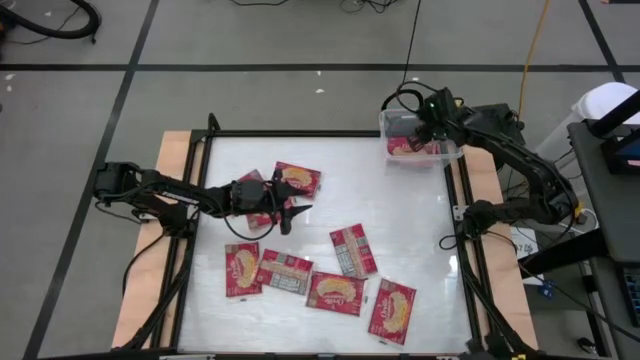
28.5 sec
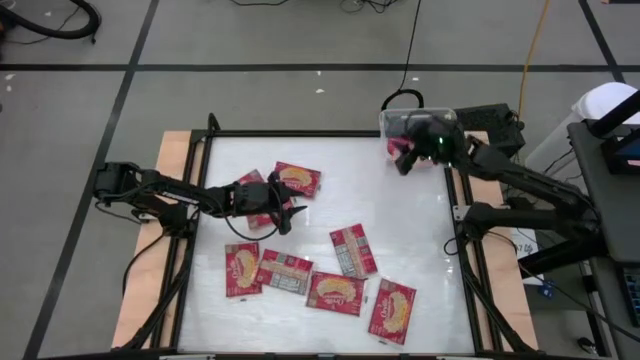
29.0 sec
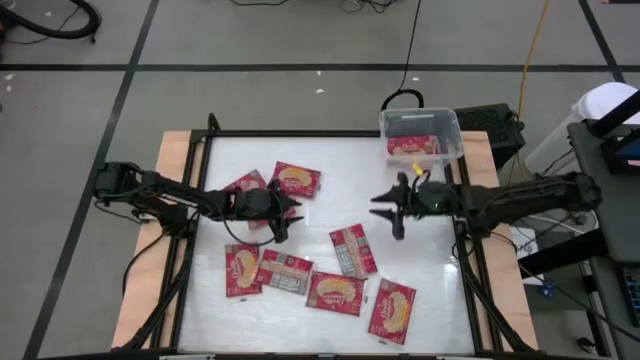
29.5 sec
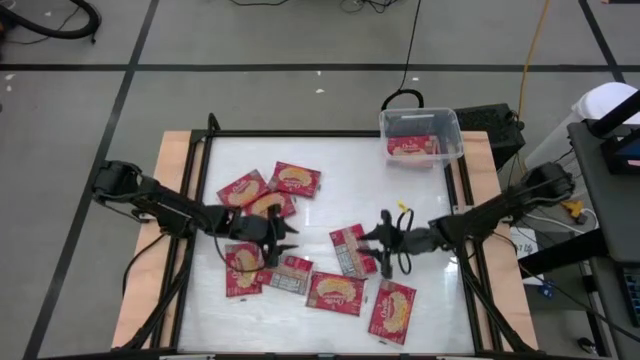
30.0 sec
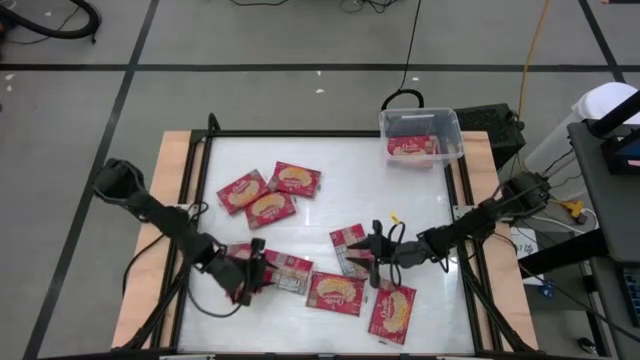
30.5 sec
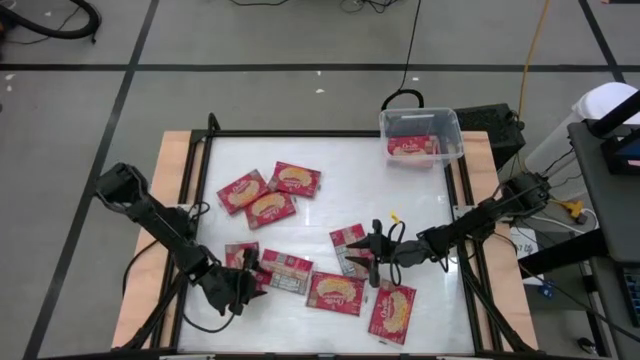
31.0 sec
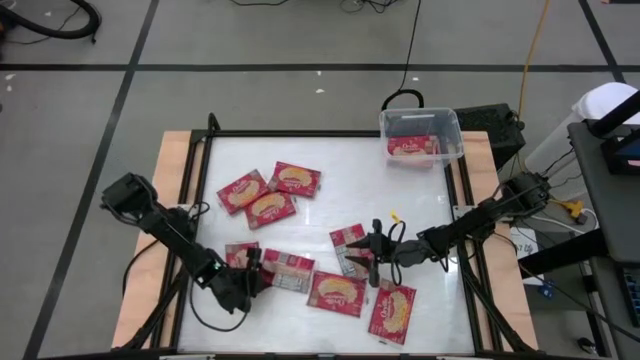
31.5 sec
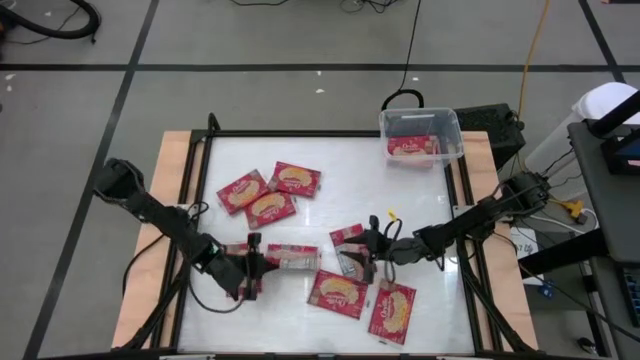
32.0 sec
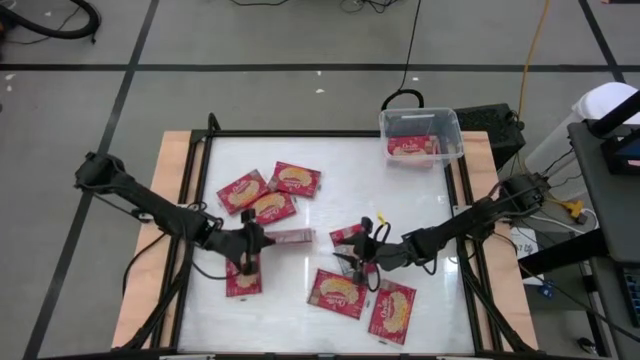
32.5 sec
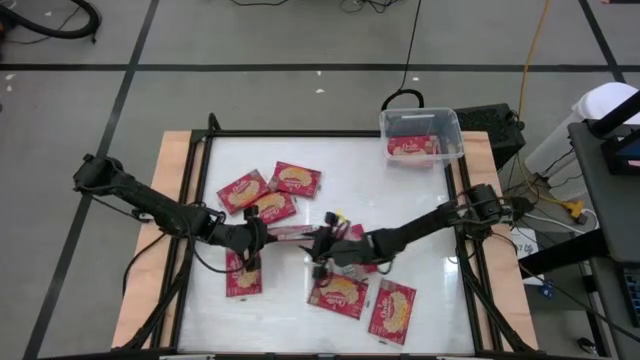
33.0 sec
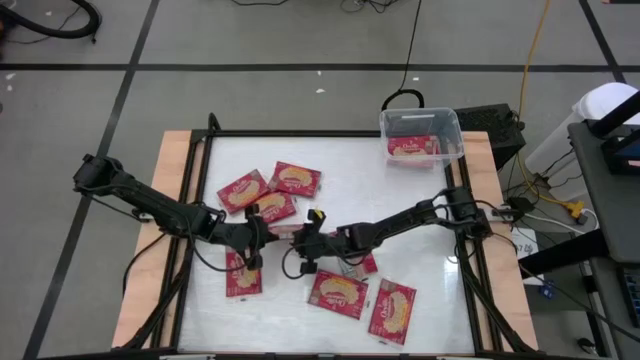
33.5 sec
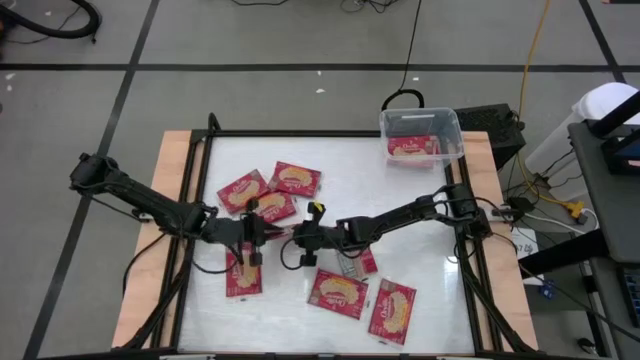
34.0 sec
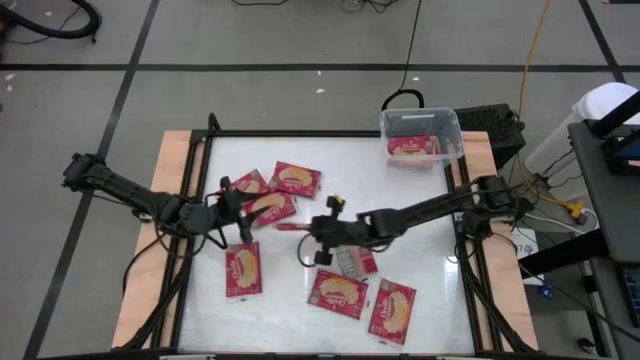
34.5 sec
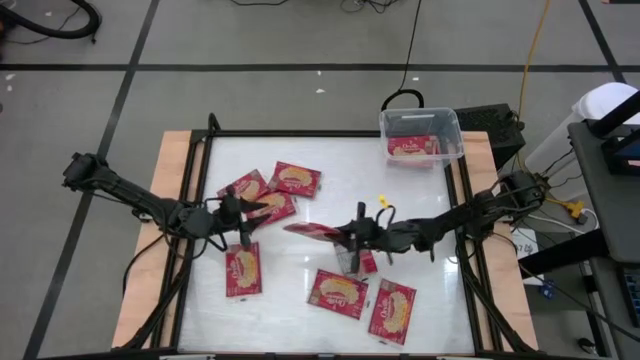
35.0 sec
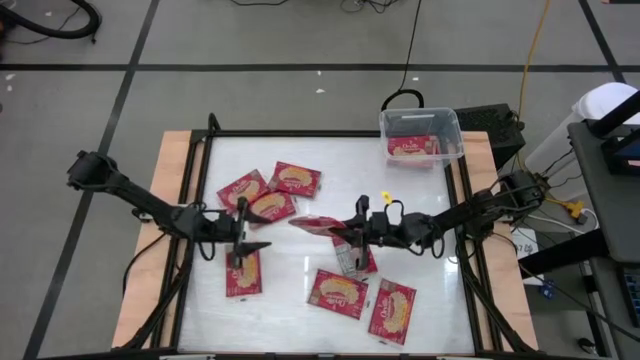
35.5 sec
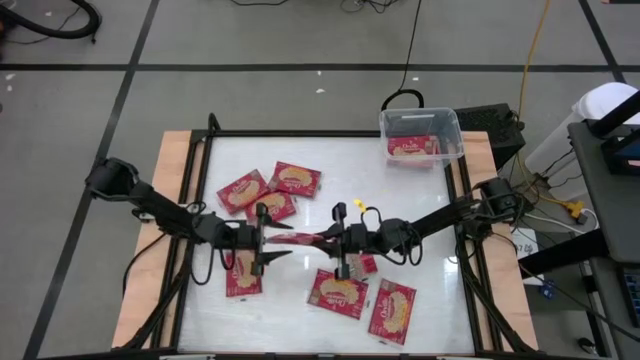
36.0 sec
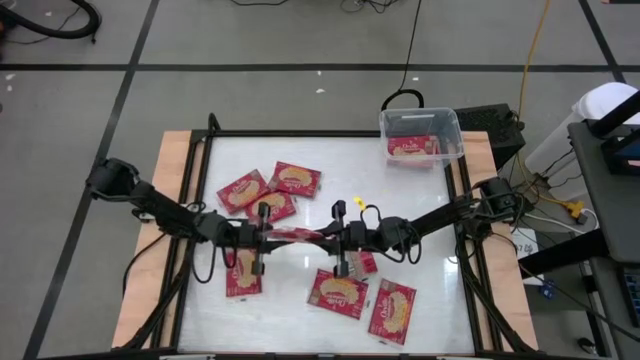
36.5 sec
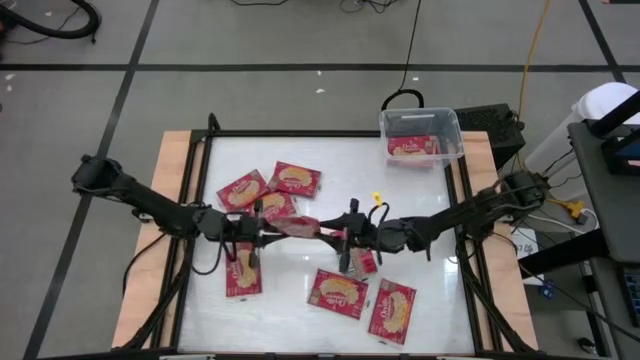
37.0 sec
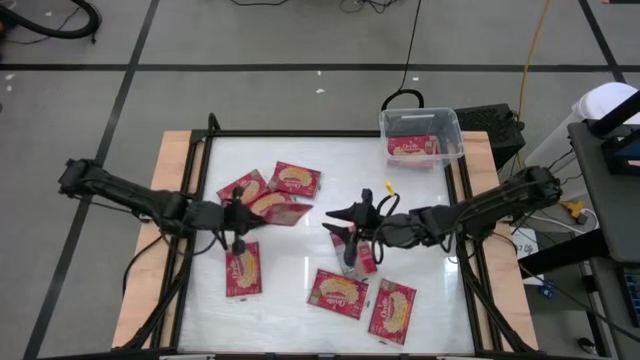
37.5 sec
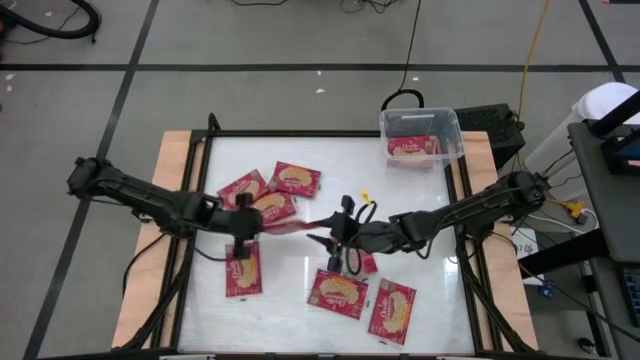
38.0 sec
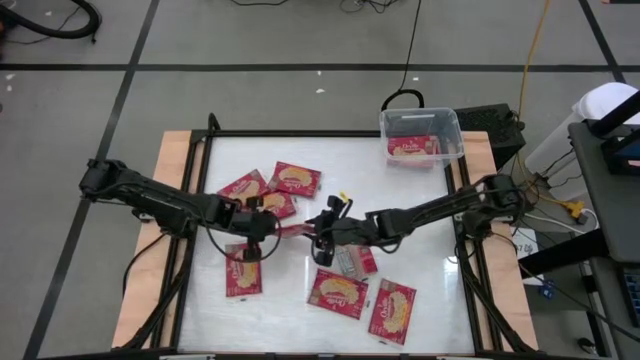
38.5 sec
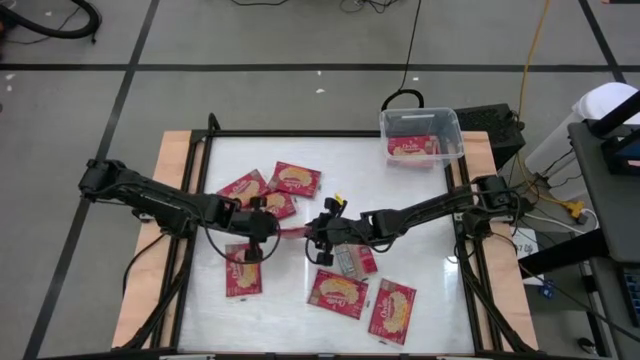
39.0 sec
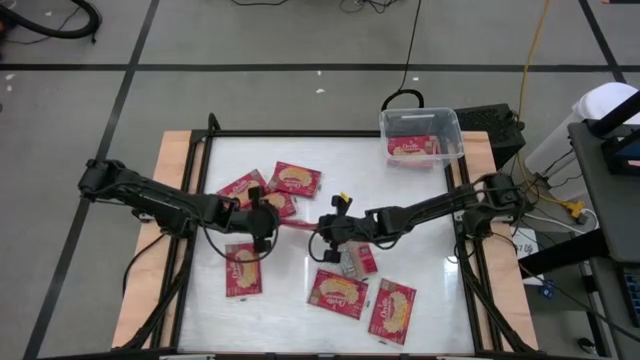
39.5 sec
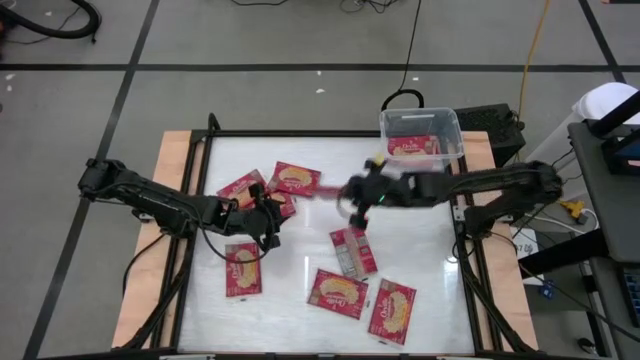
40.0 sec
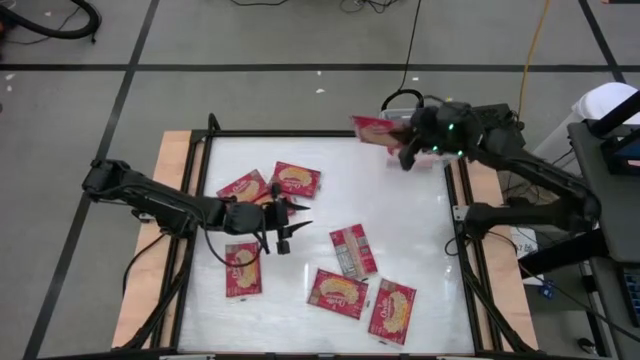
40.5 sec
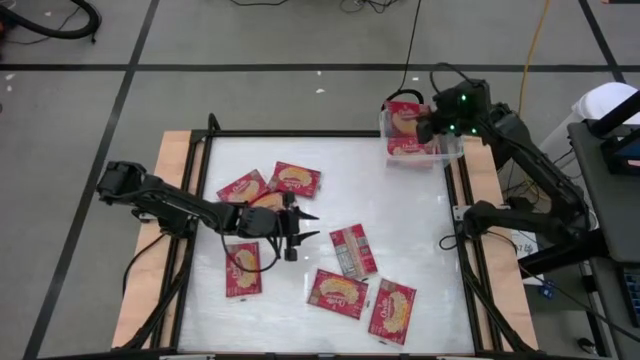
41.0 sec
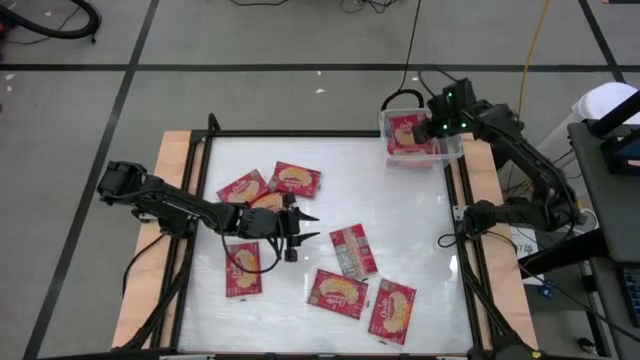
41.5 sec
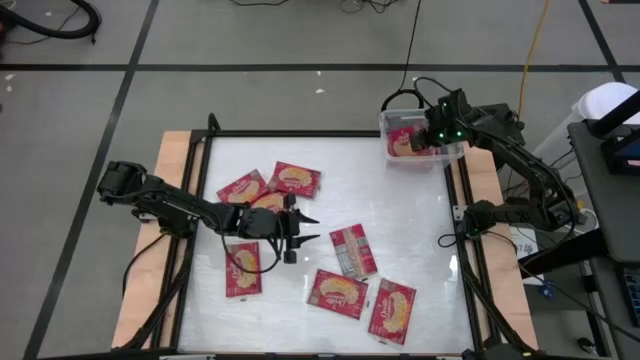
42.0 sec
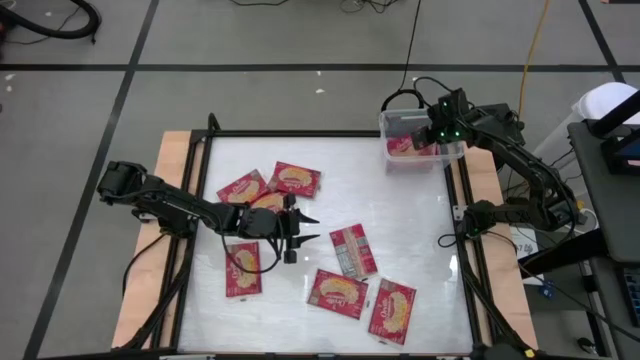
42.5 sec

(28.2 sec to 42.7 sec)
Task: Sort popcorn bags into baskets
Put the red popcorn bag into the transparent bin

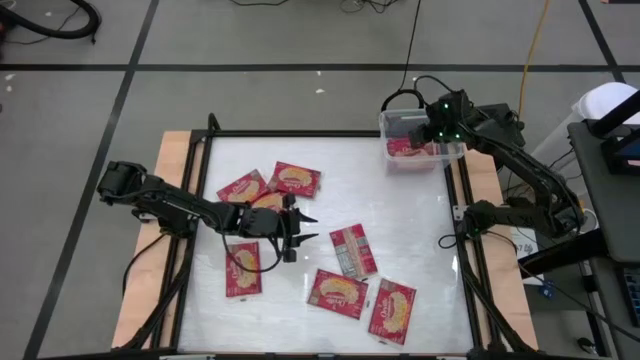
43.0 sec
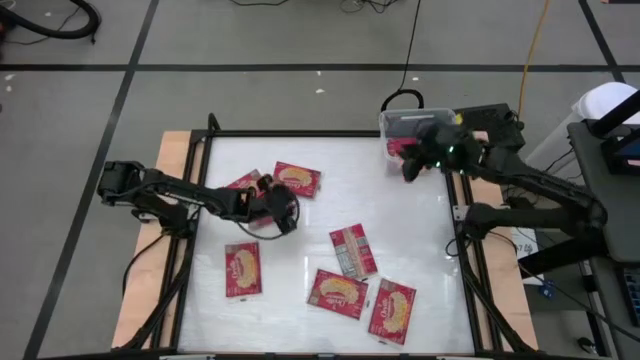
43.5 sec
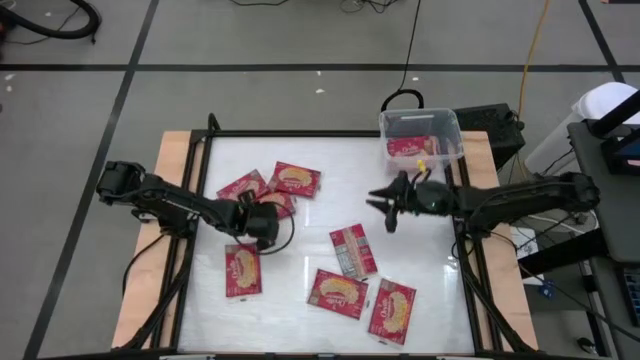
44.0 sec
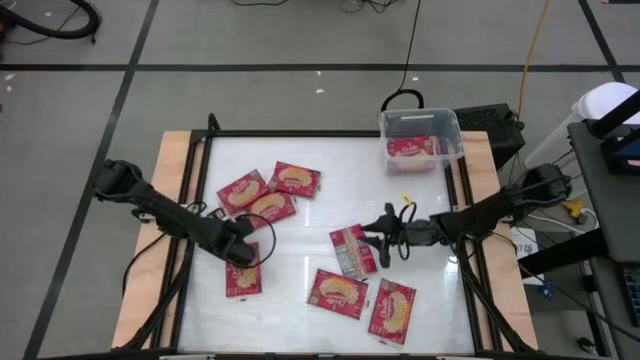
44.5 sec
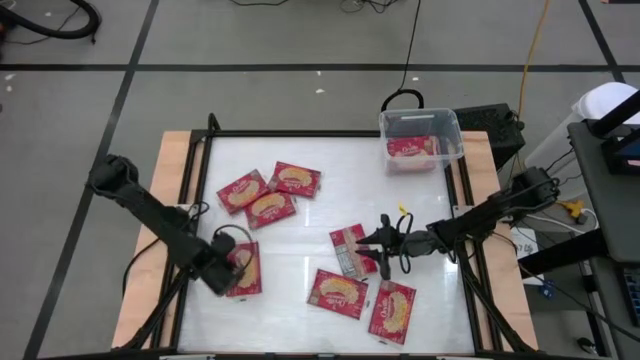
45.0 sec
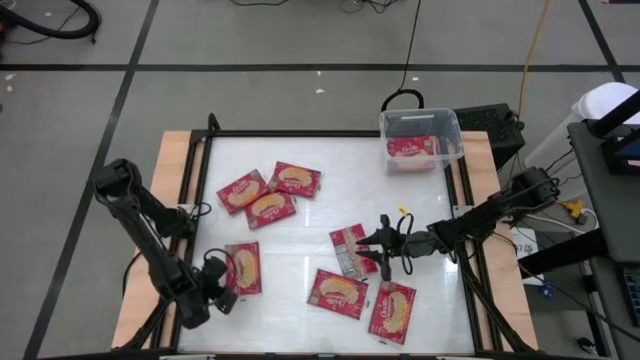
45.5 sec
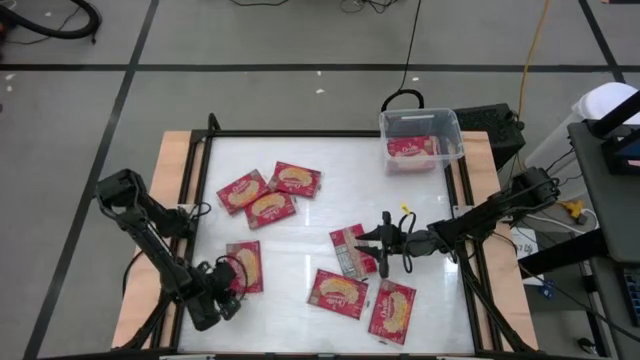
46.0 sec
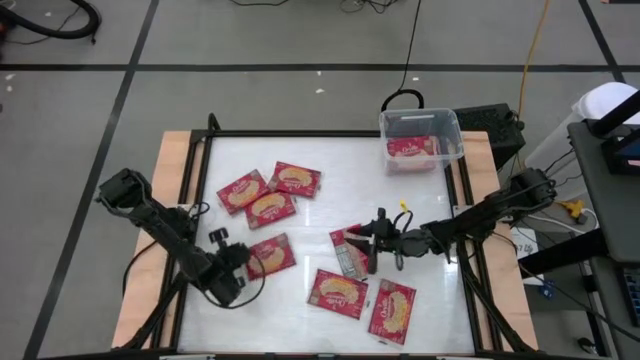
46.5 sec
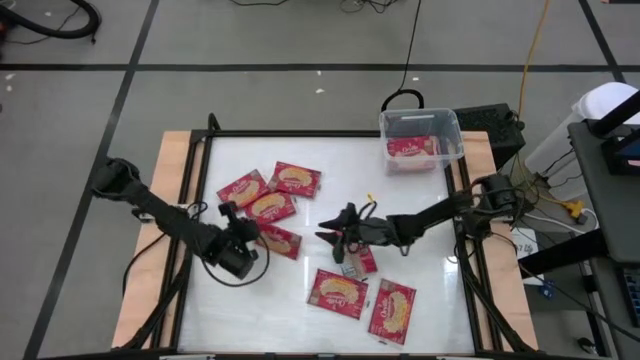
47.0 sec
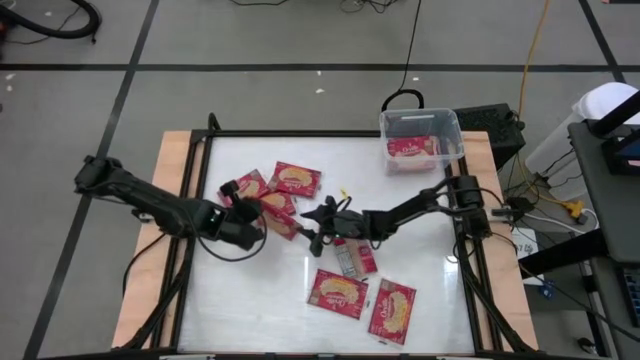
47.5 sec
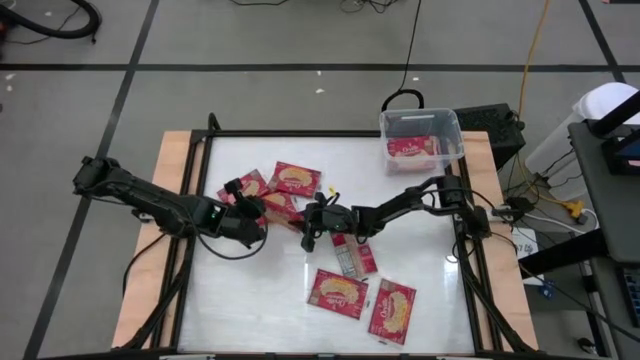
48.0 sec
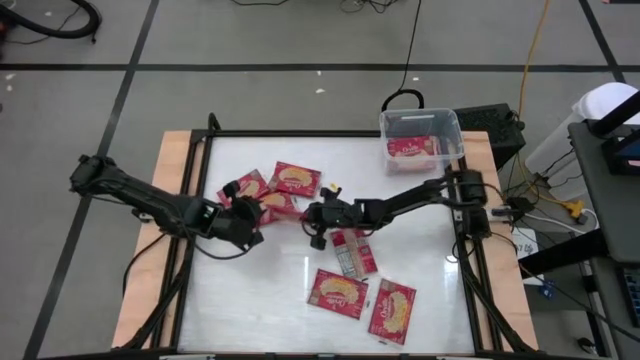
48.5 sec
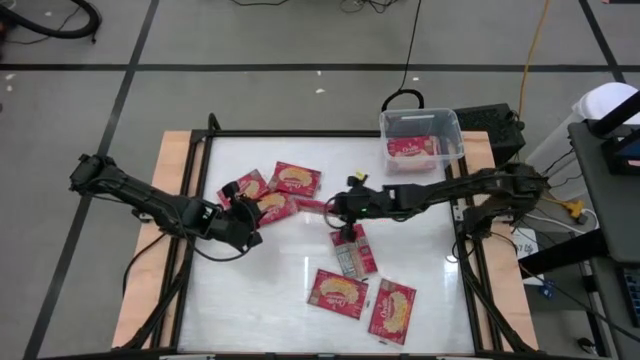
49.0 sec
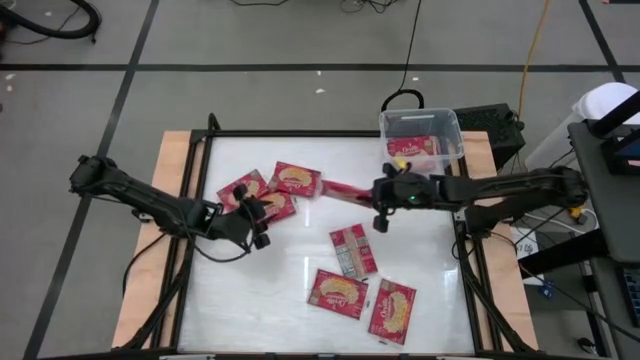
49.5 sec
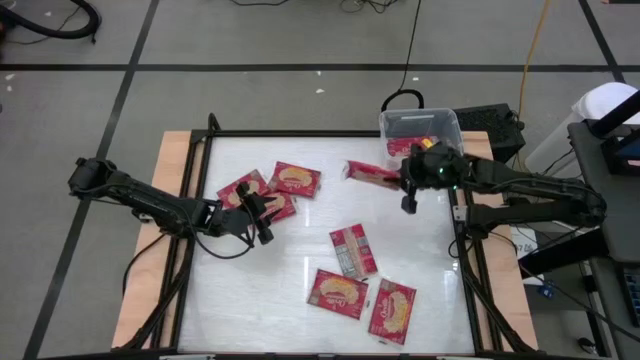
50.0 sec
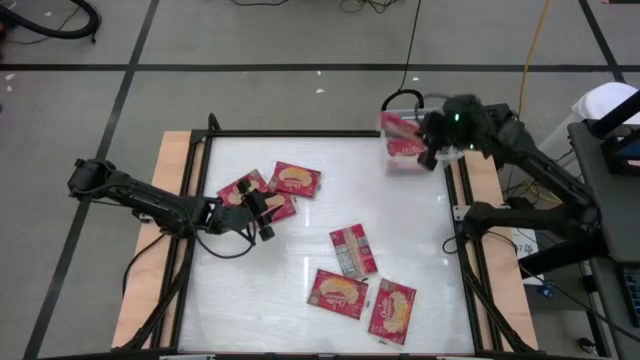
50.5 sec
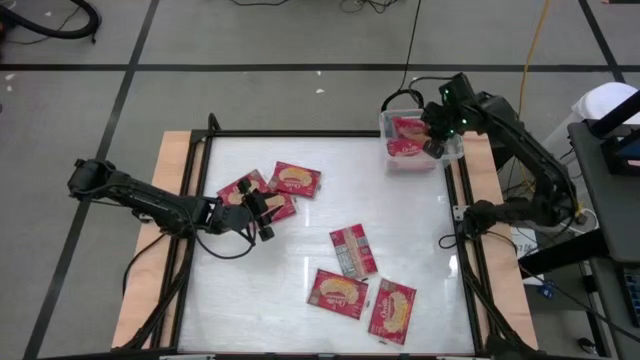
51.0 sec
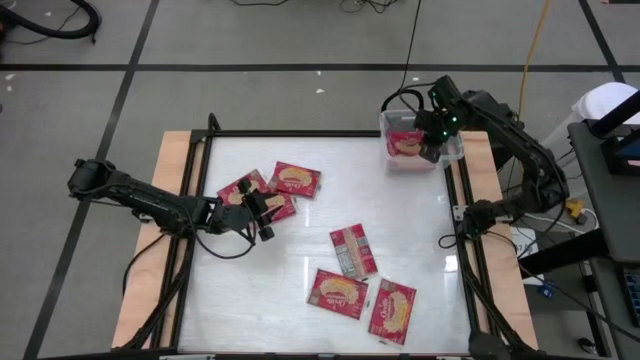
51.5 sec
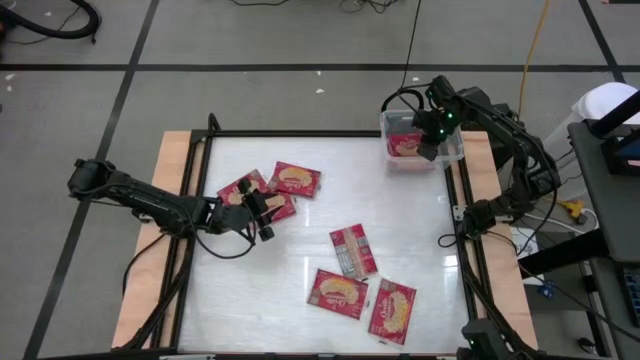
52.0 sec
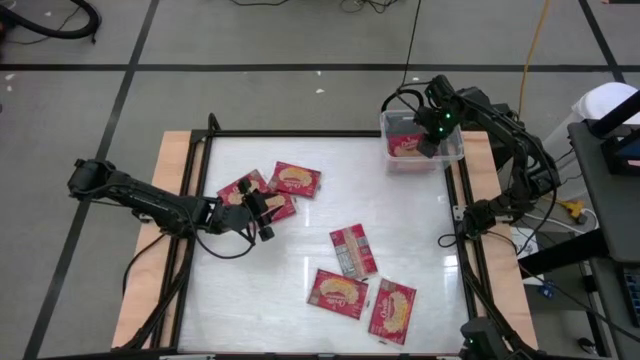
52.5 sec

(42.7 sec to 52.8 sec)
Put the red popcorn bag into the transparent bin
